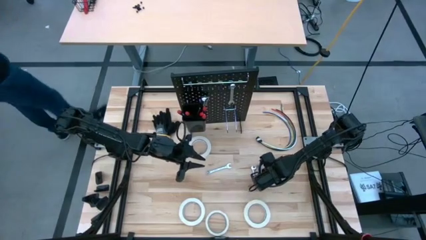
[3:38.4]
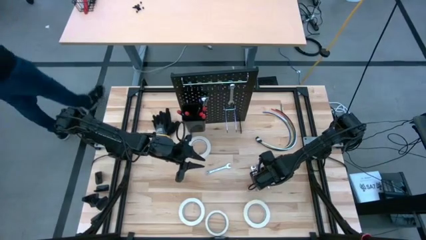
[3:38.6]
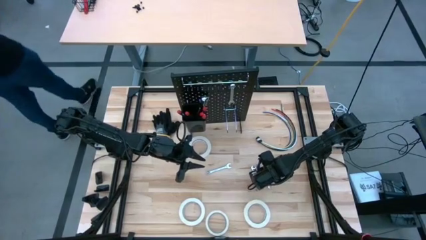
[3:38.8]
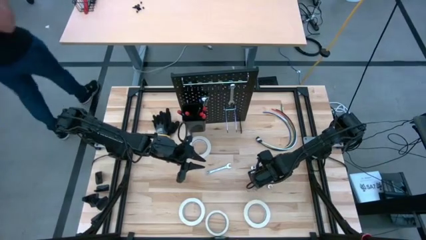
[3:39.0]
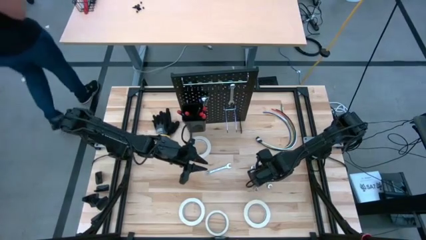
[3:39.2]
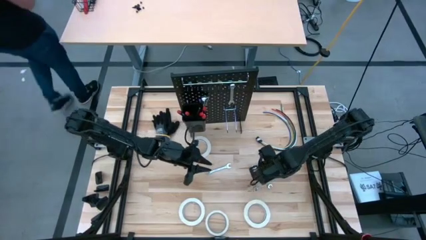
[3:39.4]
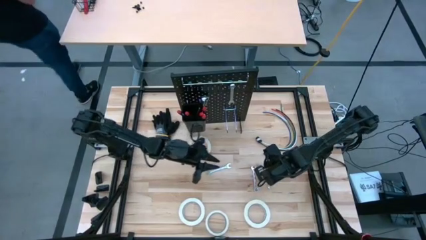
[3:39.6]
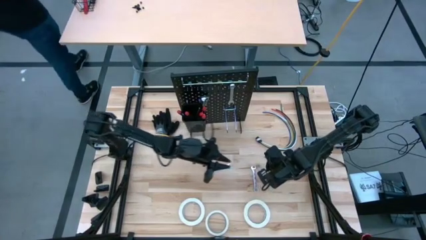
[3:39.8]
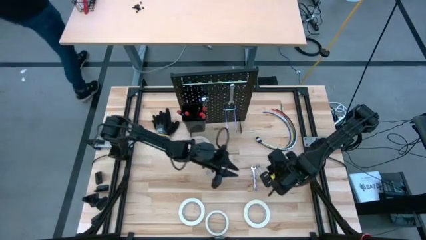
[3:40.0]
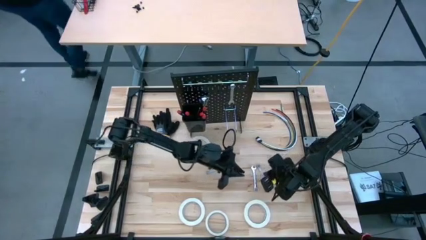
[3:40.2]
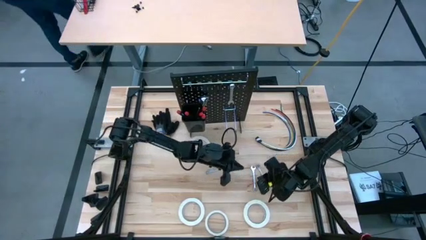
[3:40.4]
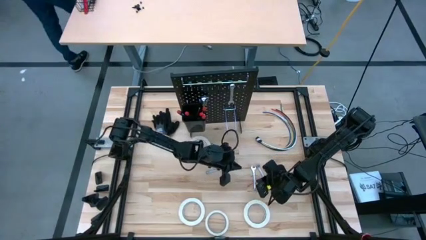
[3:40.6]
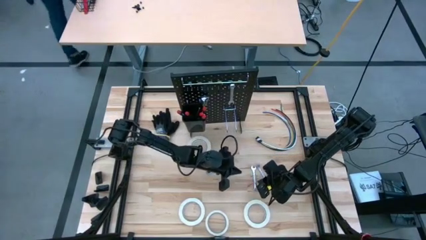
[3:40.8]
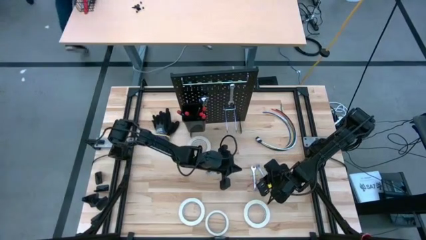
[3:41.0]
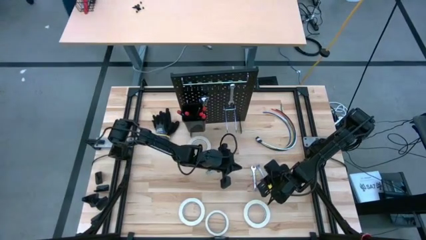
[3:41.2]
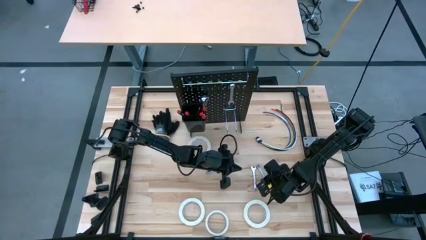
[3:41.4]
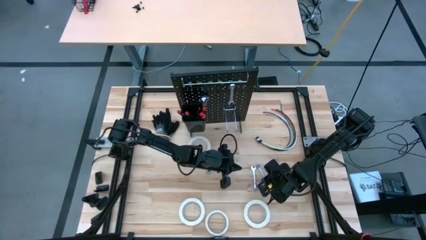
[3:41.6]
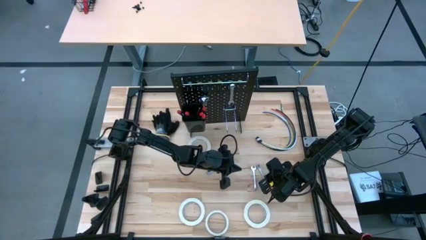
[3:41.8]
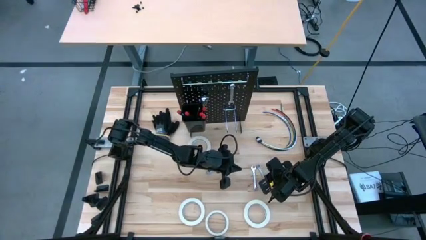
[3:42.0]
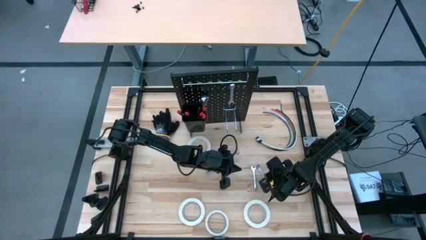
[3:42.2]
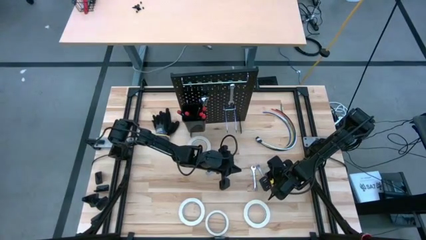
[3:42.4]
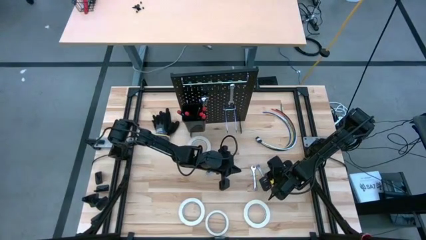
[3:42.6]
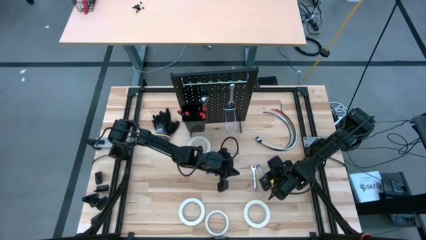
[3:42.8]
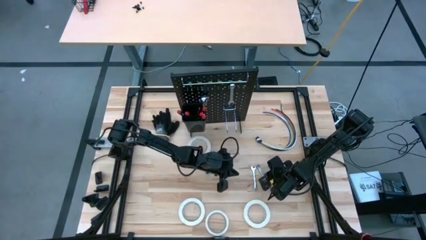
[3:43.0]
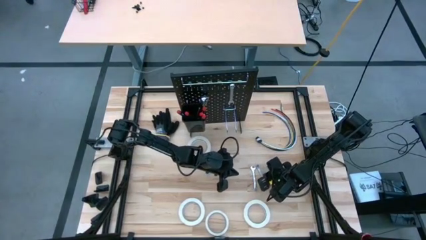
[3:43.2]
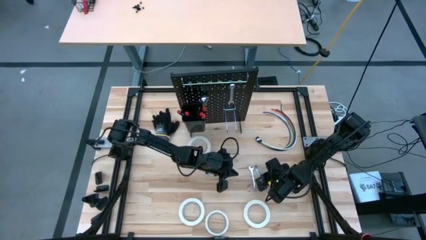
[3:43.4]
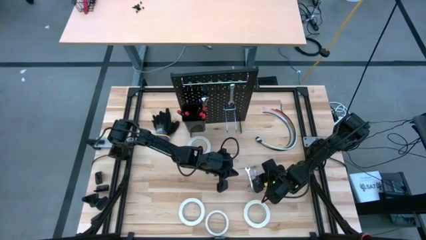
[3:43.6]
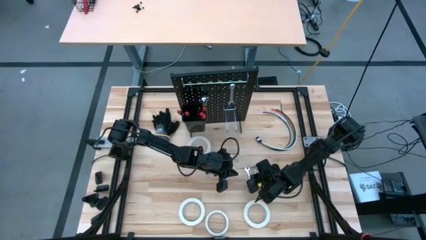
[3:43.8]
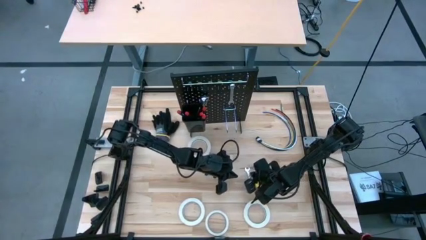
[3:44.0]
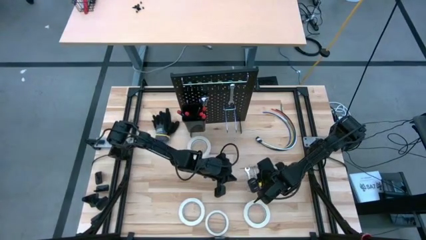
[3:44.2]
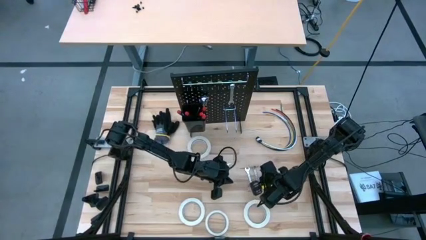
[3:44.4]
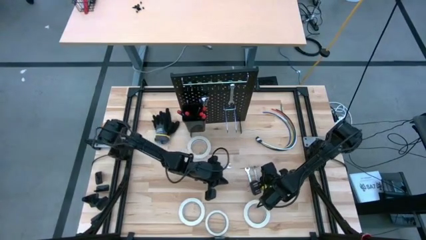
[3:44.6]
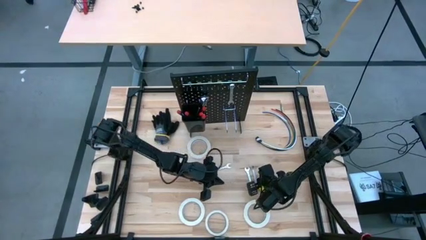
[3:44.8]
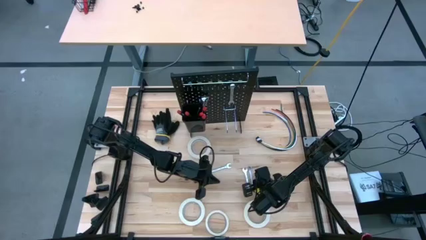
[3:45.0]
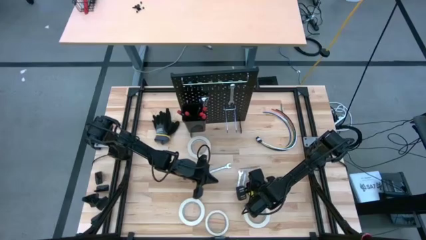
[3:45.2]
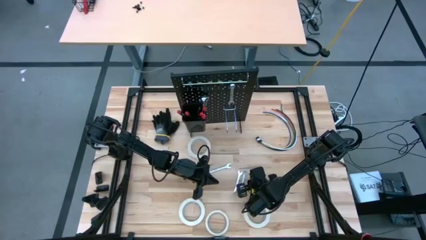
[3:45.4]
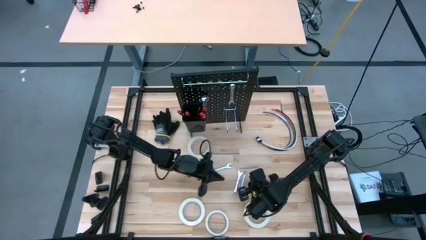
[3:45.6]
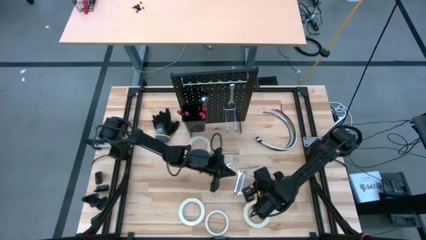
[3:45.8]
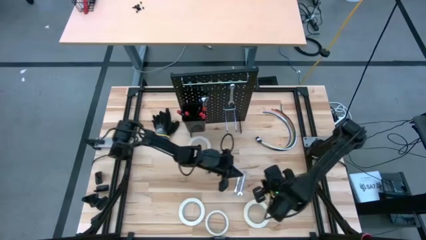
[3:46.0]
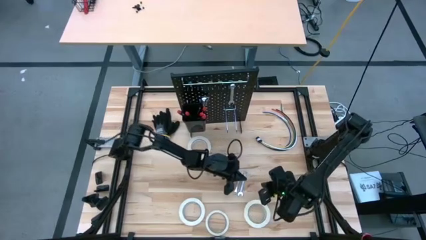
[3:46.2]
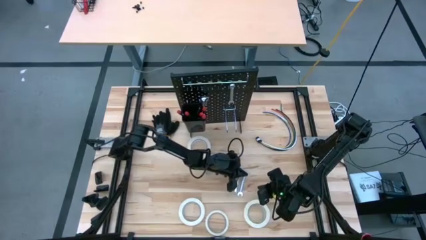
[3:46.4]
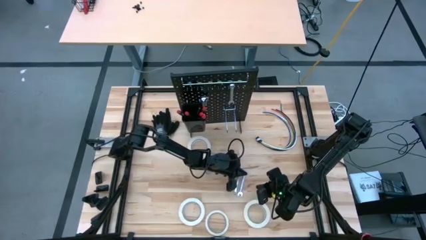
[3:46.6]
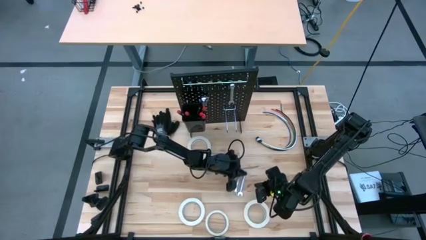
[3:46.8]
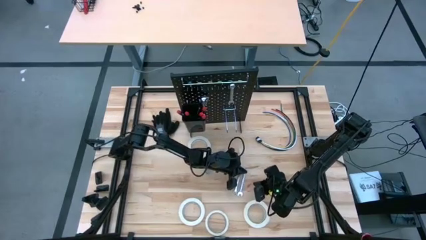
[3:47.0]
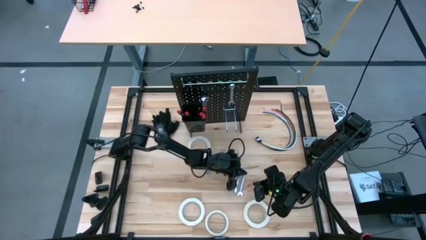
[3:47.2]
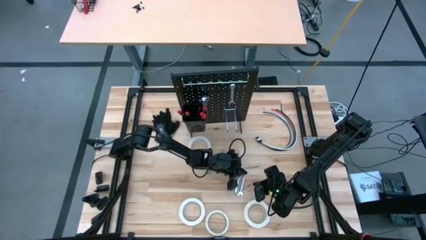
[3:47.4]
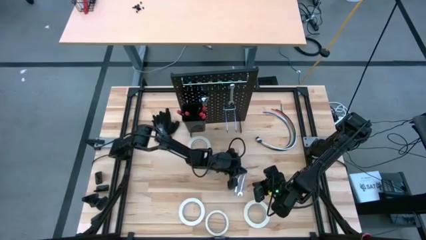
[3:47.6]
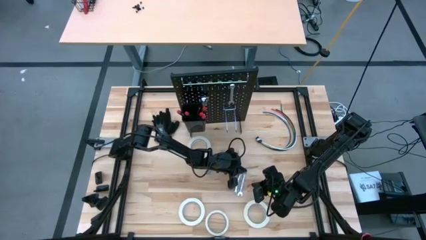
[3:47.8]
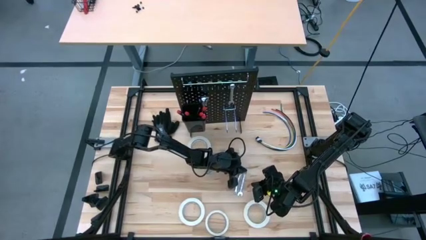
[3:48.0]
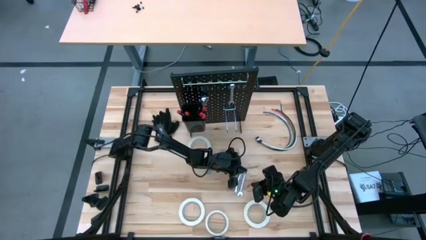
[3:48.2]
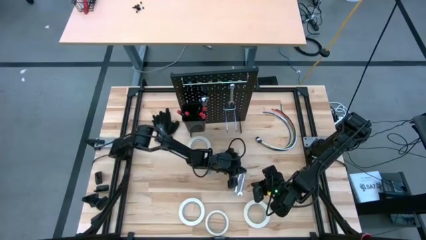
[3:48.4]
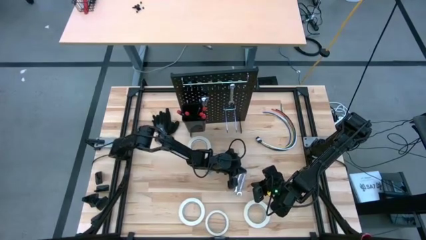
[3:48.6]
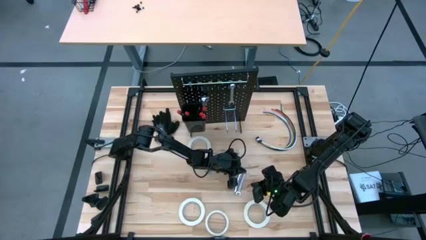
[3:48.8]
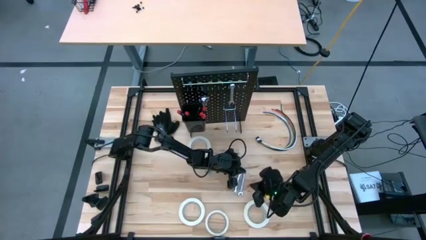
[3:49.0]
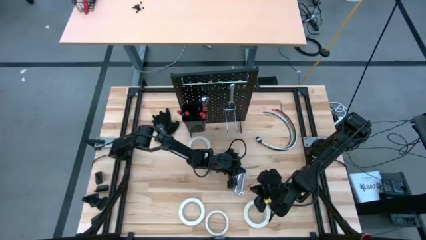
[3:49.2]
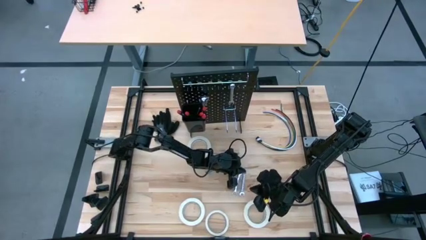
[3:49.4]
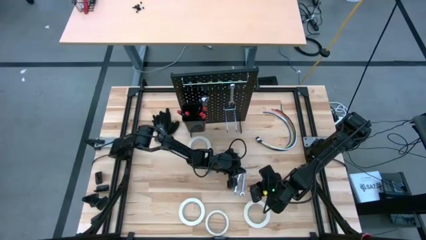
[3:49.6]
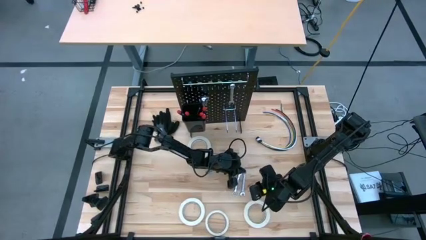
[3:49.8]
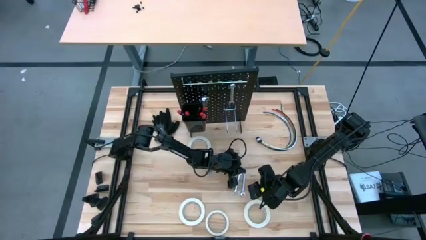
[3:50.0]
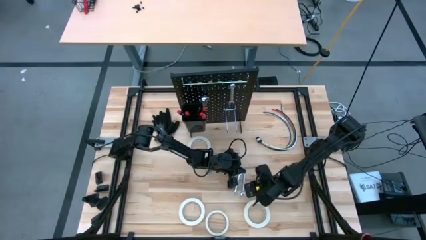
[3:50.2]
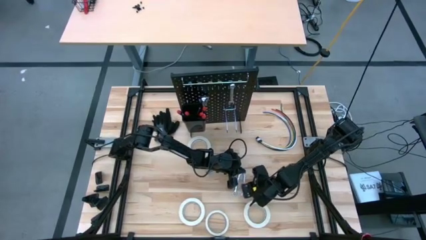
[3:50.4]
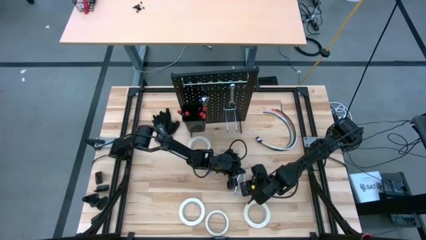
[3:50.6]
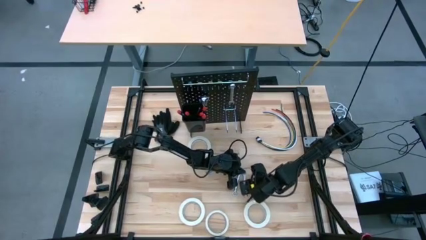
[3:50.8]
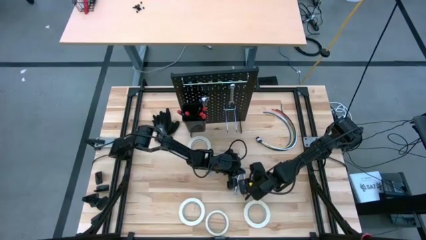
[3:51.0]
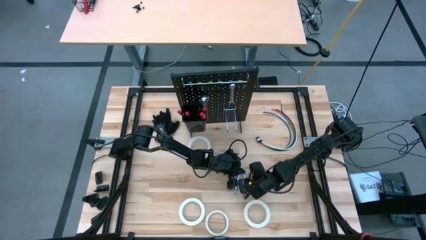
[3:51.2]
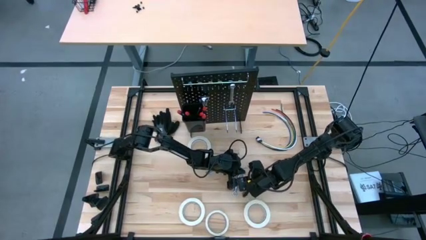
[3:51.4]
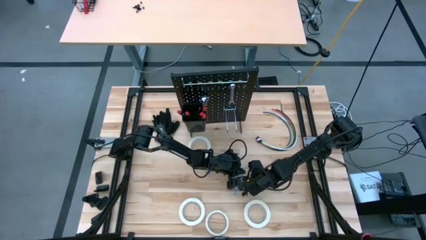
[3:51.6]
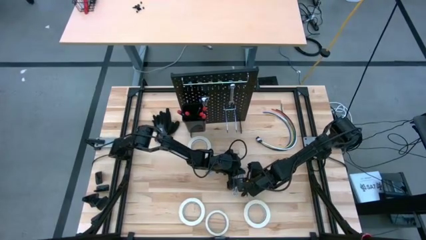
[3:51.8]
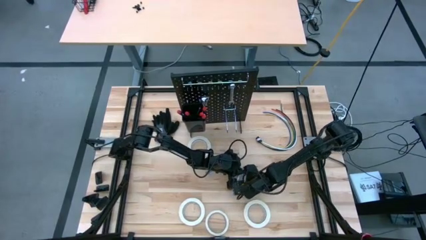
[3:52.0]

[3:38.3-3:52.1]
Task: Hang tools onto peg board
Hang the silver wrench on the peg board

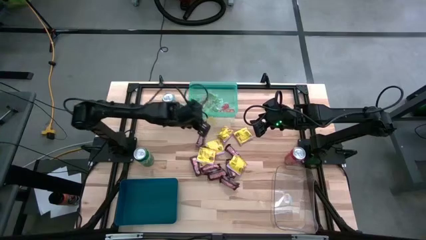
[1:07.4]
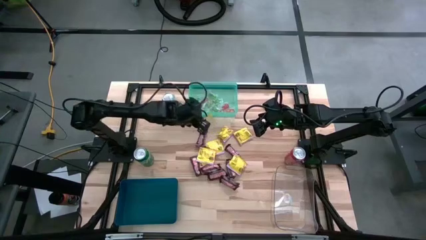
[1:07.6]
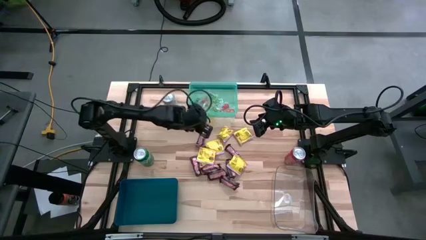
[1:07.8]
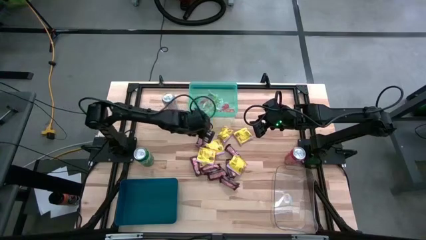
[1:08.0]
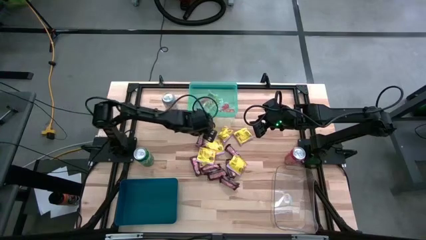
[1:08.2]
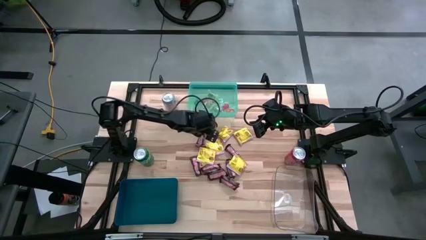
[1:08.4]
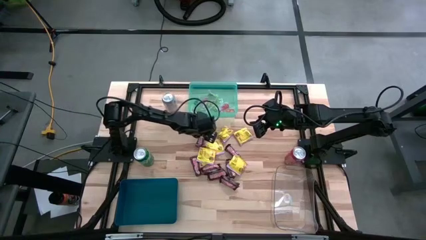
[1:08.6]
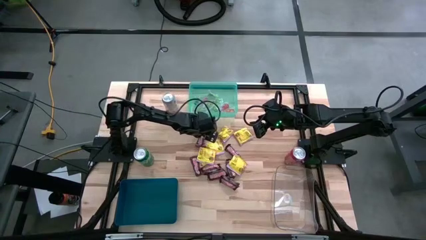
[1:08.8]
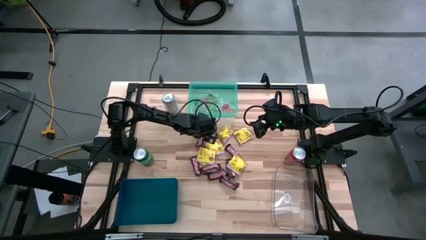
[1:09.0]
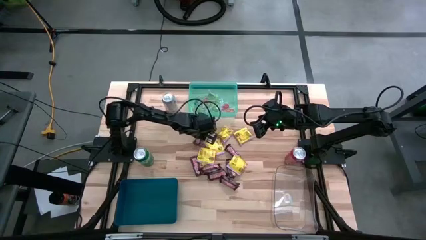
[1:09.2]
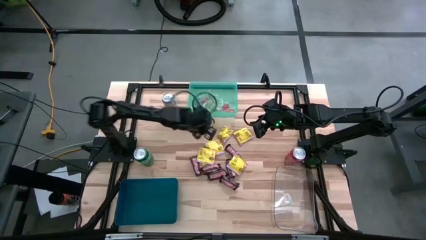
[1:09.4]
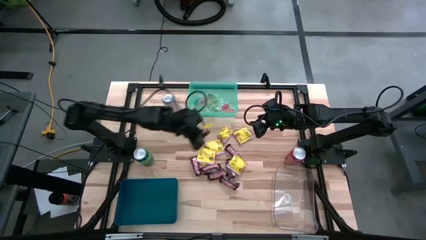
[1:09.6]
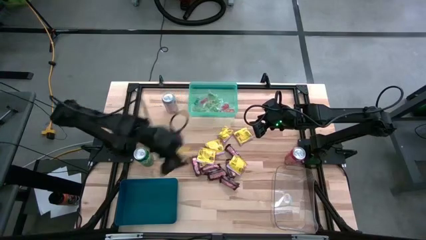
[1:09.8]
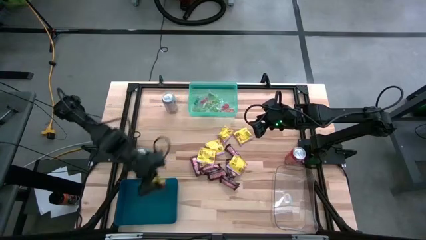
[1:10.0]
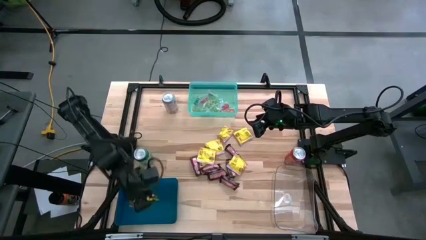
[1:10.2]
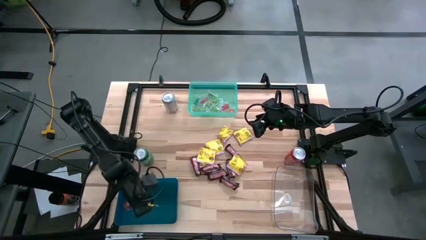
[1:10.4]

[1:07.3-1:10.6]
Task: Sort candy
Put the brown chocolate into the dark blue bin
